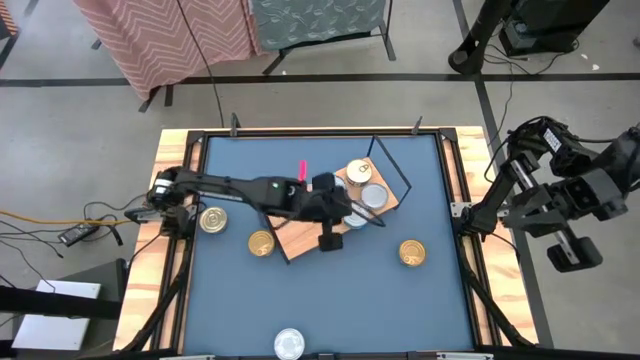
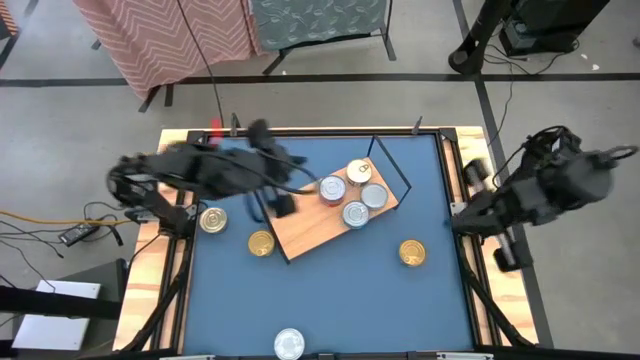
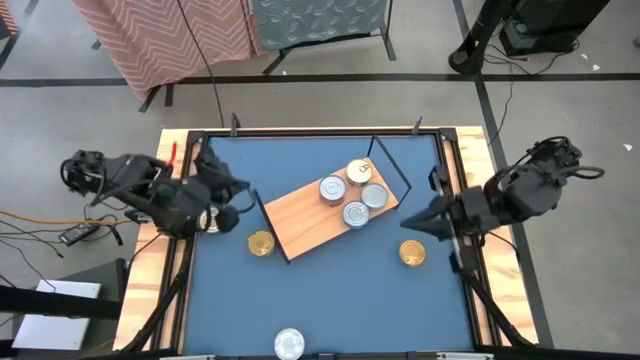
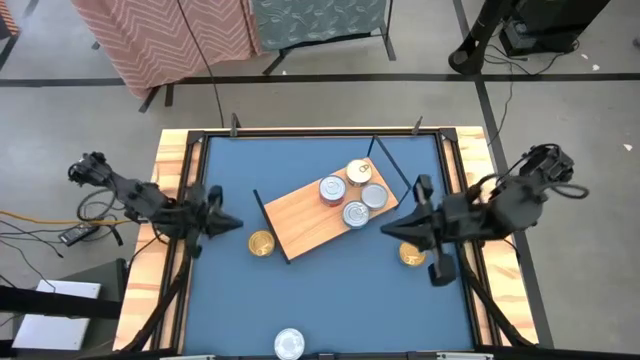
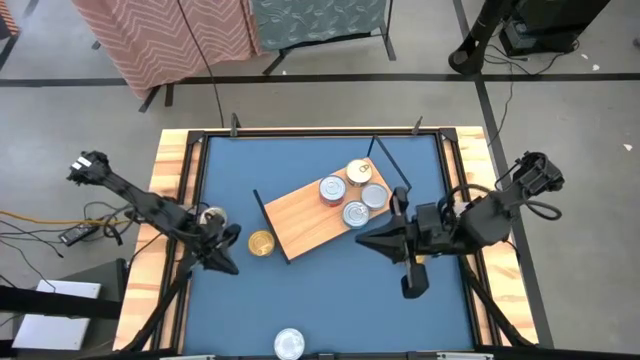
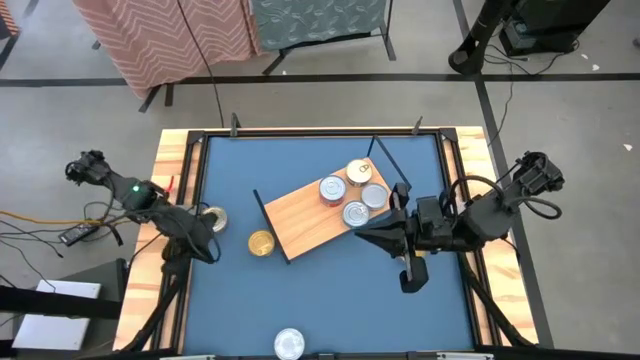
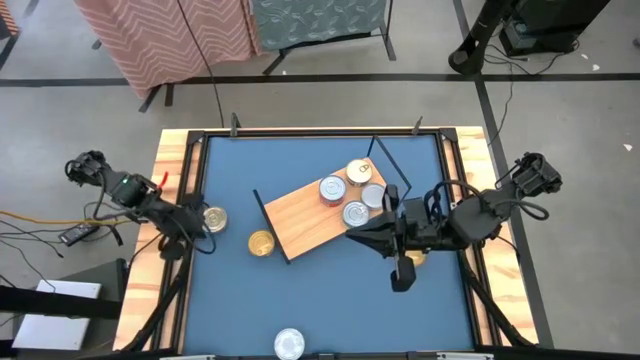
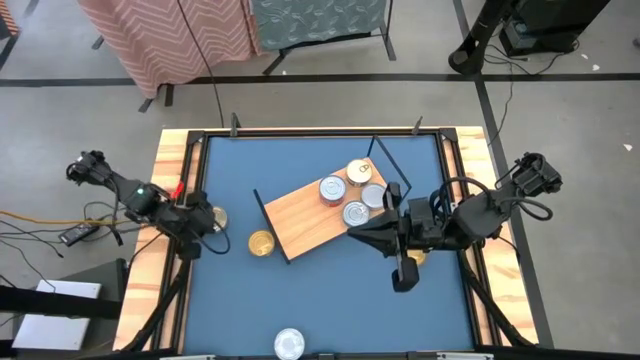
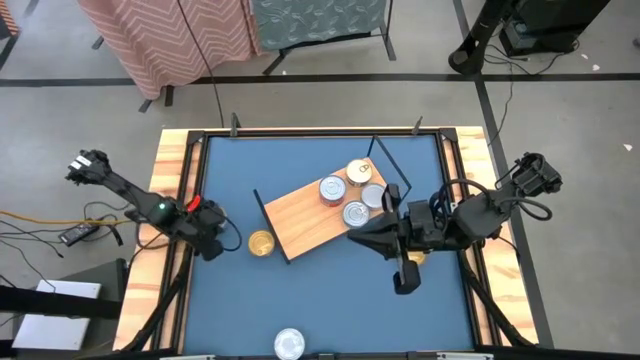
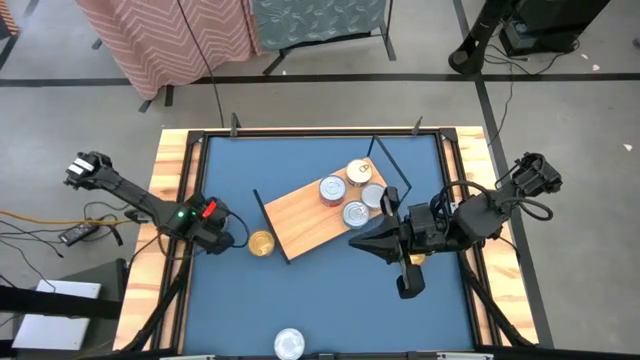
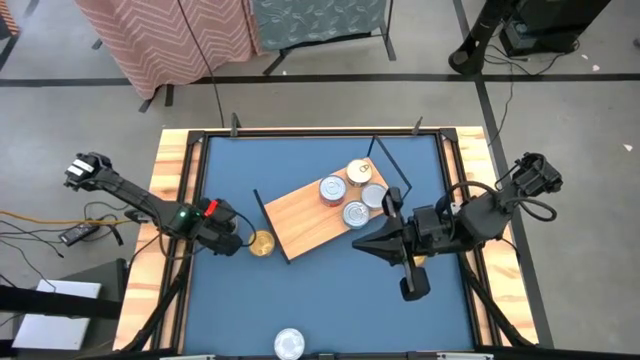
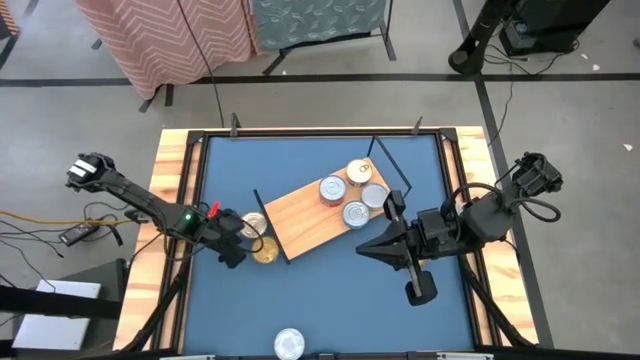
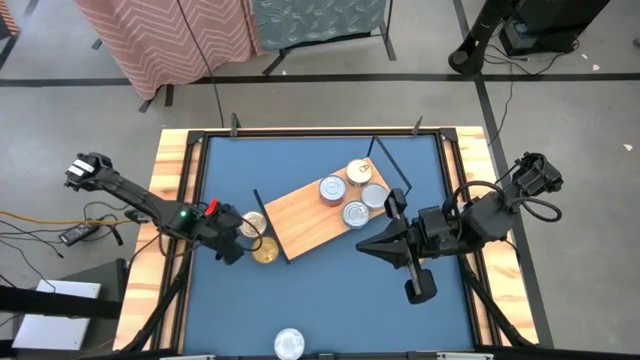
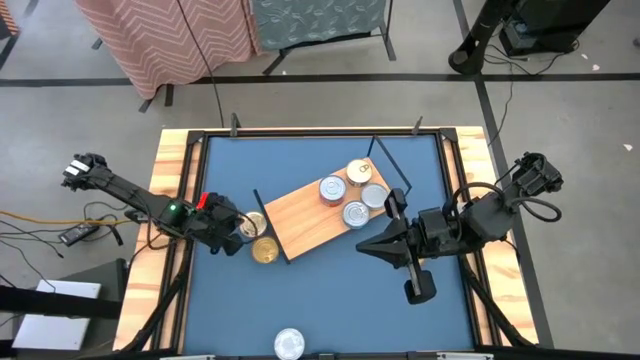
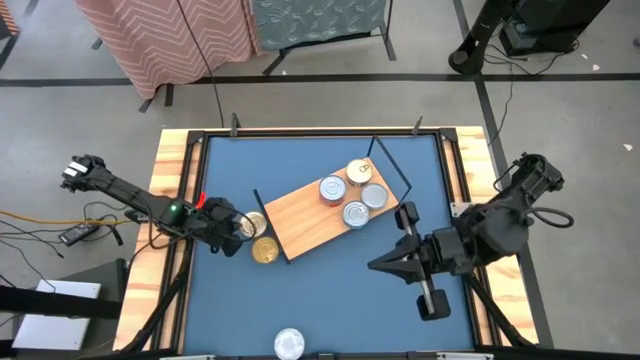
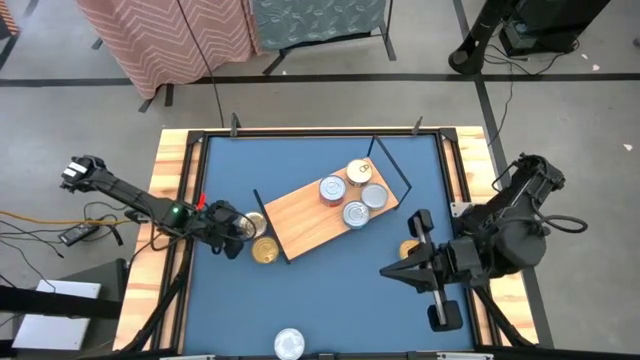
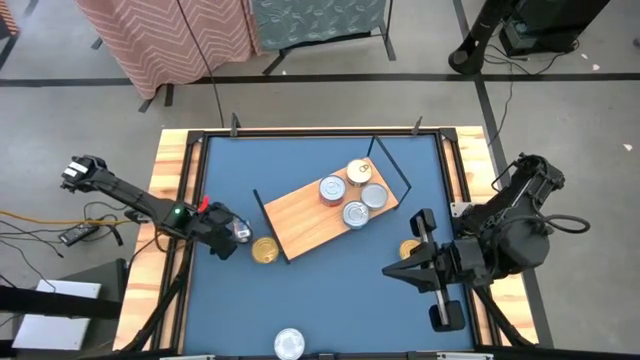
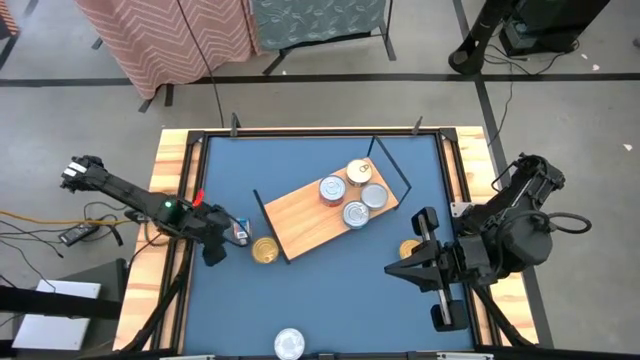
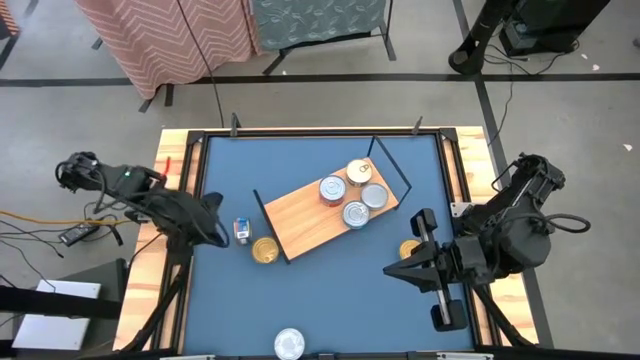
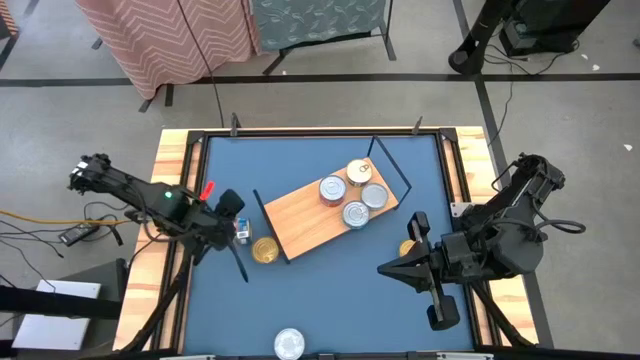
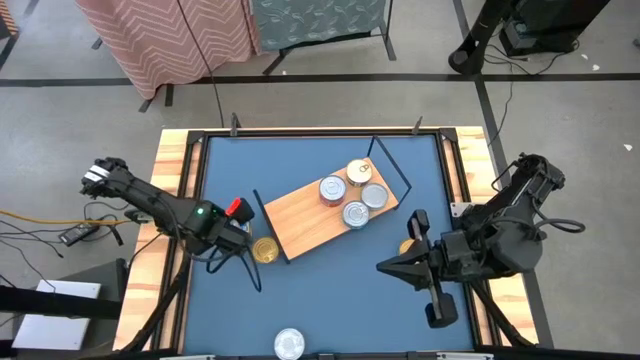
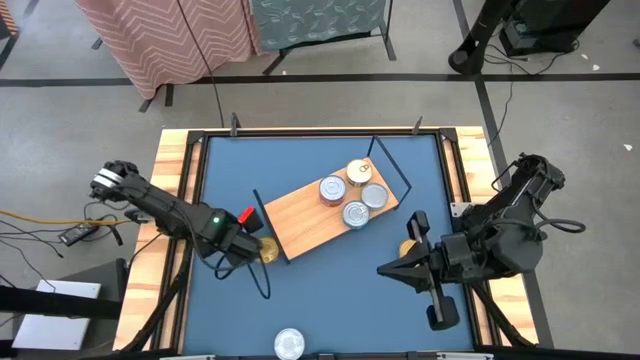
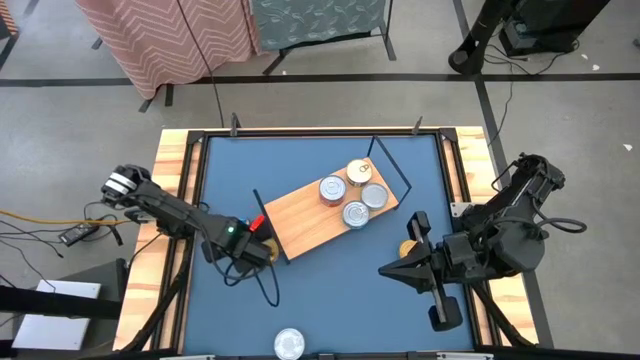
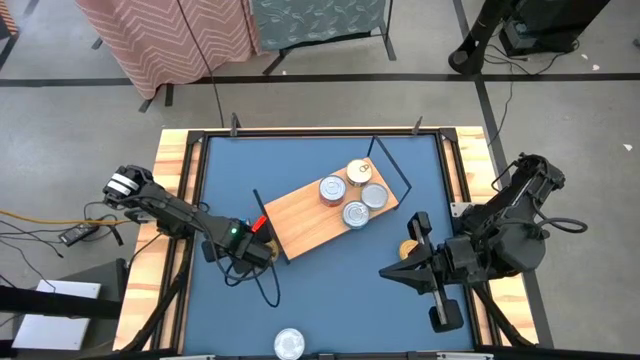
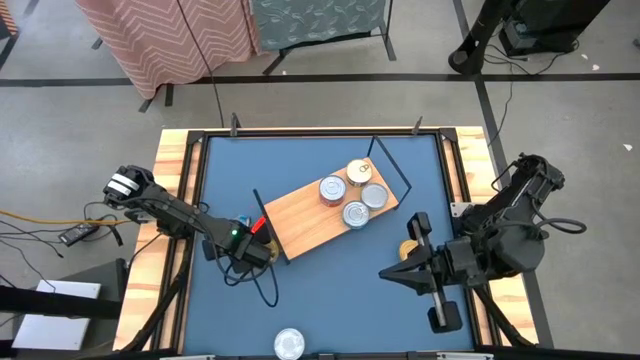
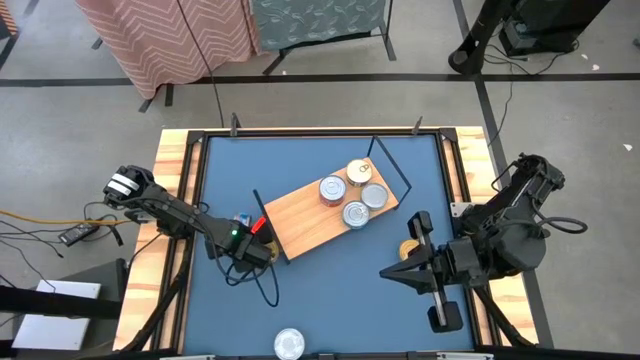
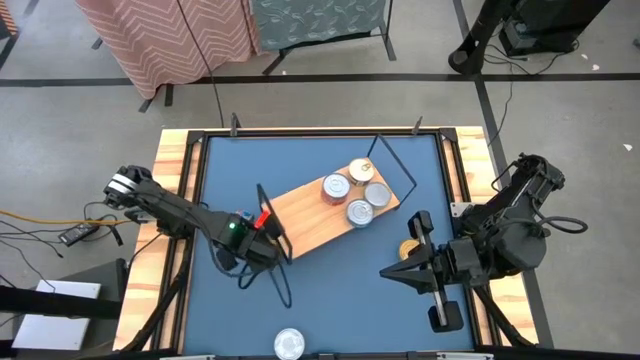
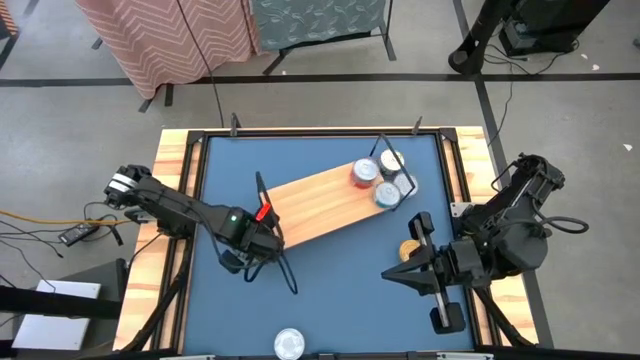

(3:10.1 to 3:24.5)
Task: Stack canned seafood by type on shelf
Put the blue/pink tuna can on the shelf

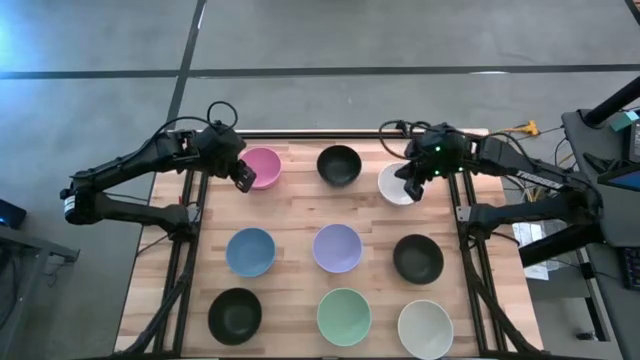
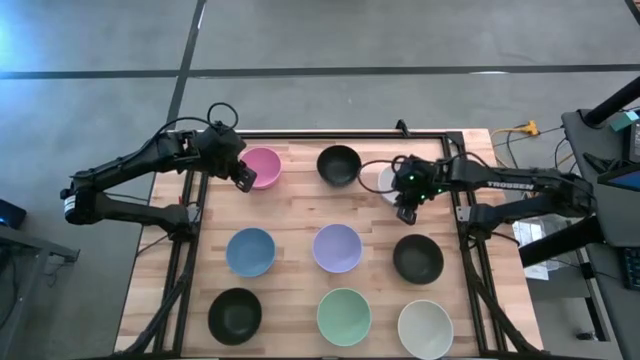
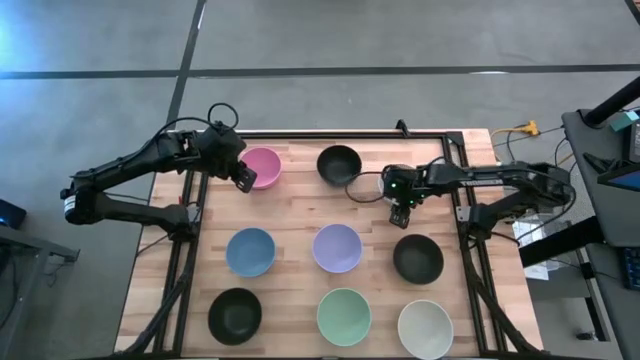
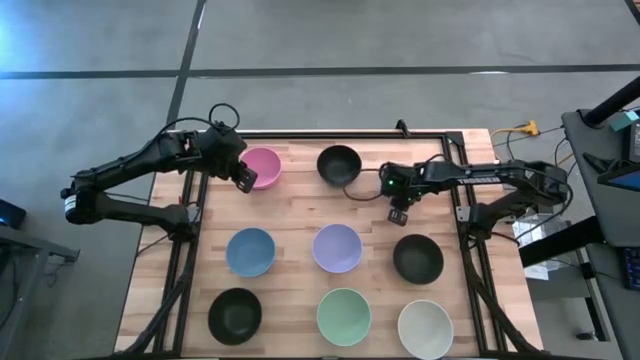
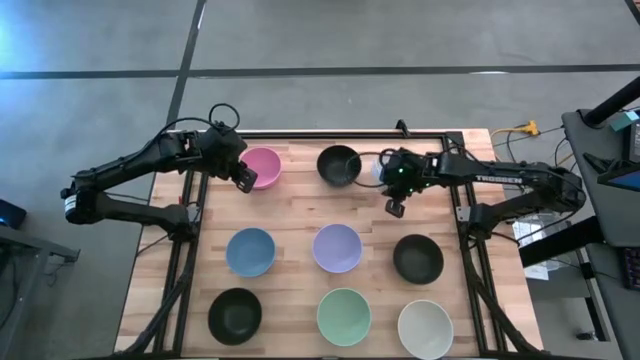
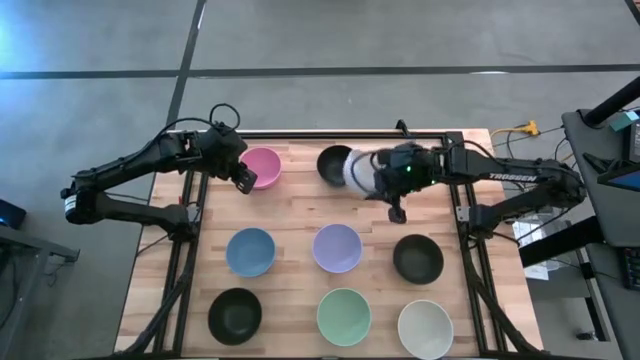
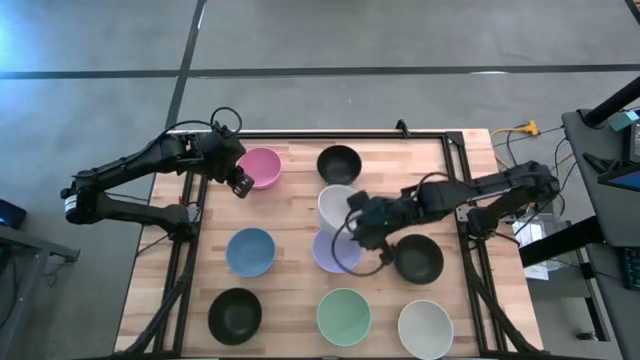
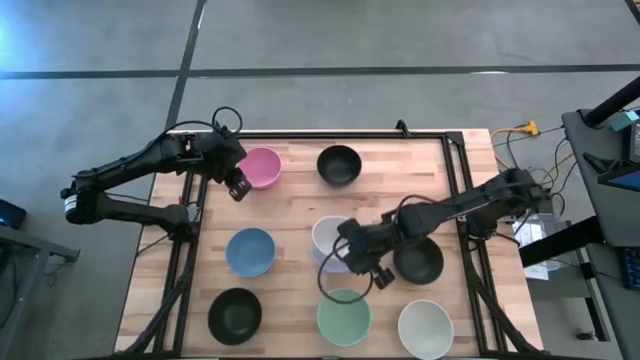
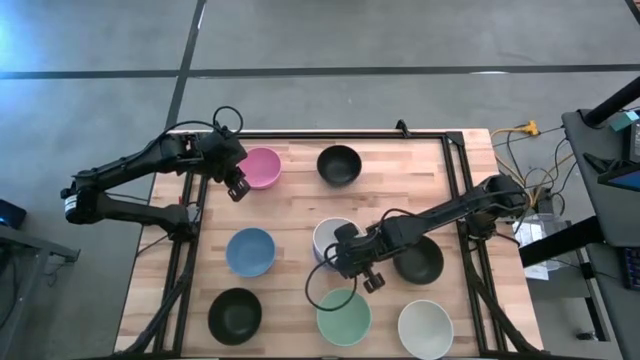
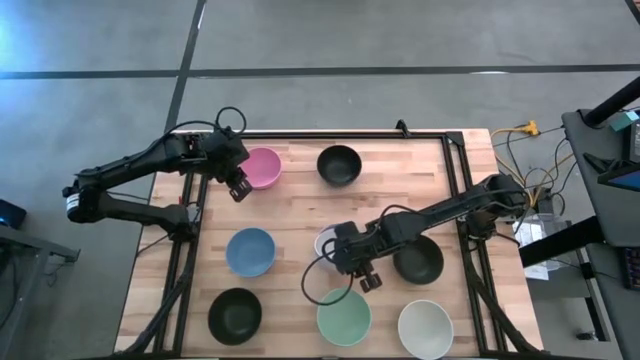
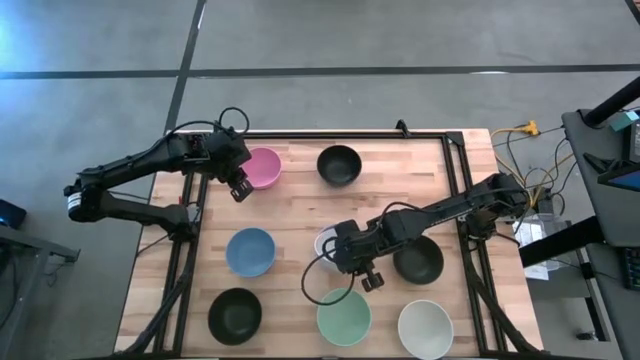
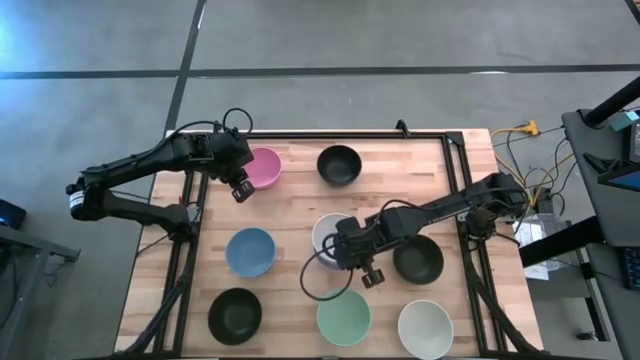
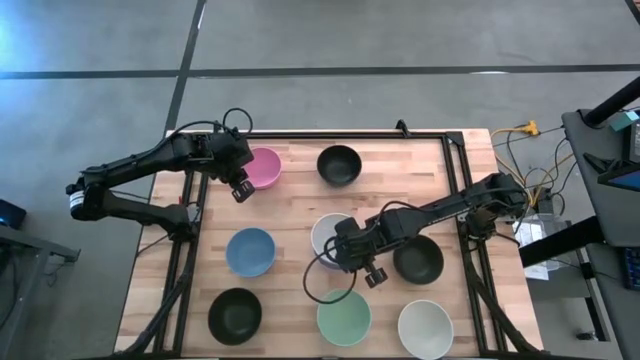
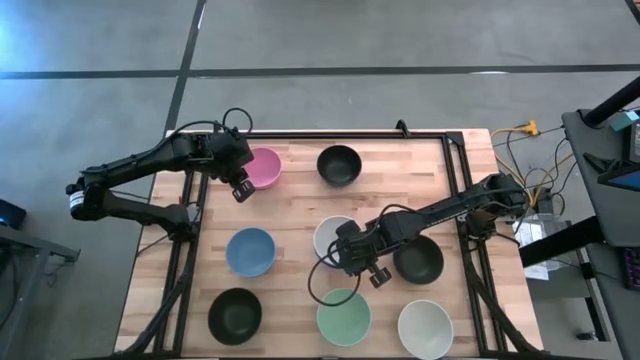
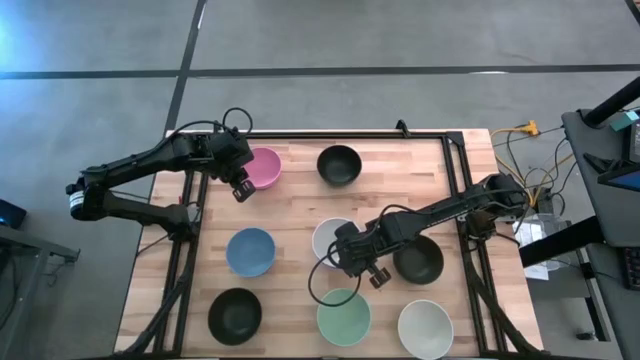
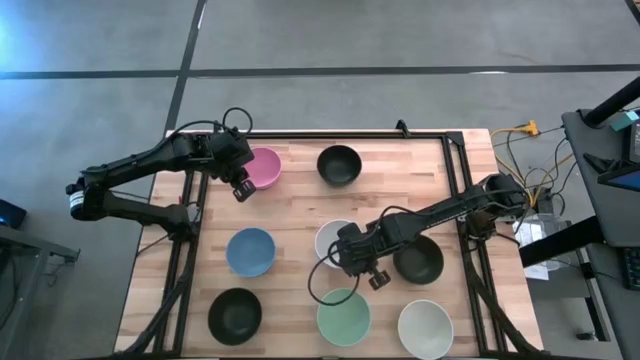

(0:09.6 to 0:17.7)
Task: Nest bowls inside each other
Stack the top white bowl on top of the purple bowl
